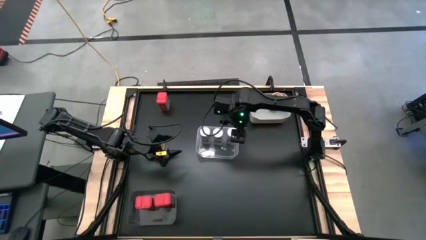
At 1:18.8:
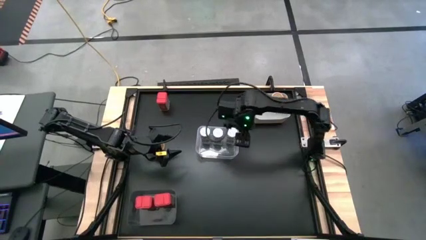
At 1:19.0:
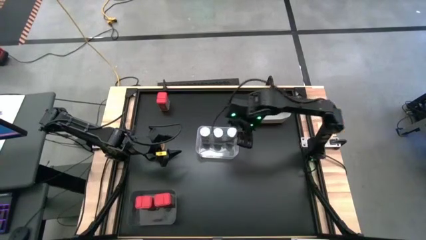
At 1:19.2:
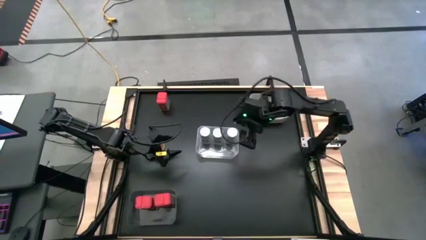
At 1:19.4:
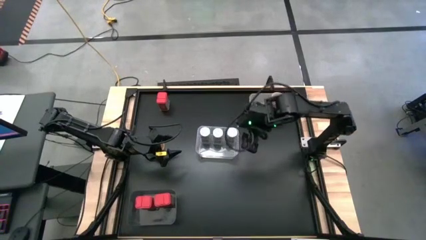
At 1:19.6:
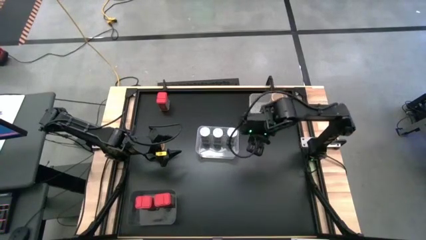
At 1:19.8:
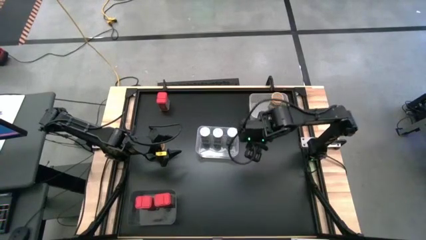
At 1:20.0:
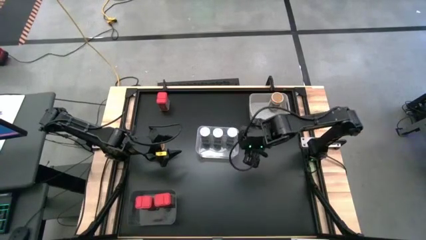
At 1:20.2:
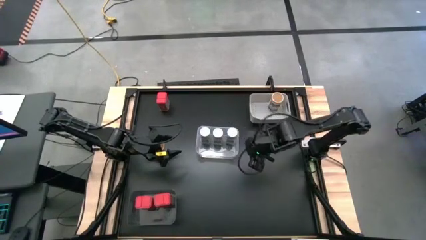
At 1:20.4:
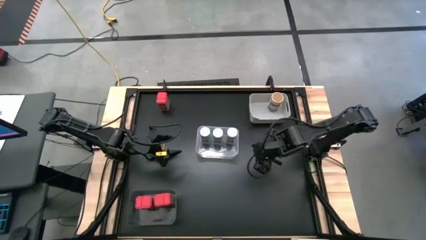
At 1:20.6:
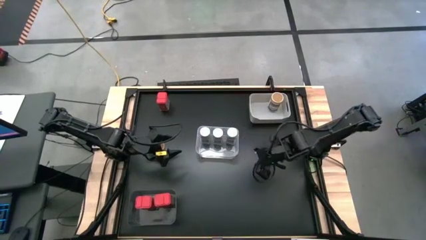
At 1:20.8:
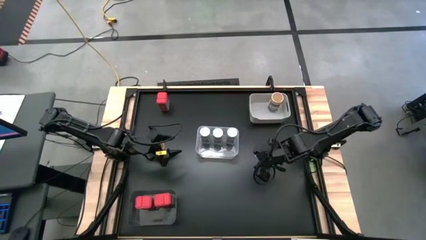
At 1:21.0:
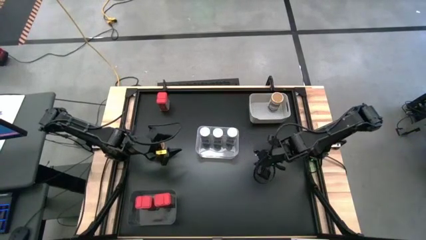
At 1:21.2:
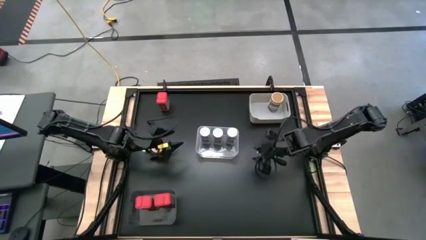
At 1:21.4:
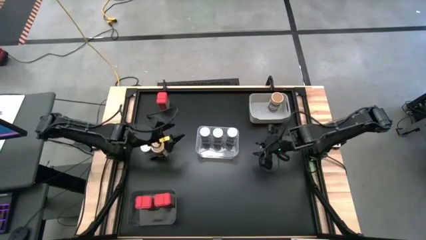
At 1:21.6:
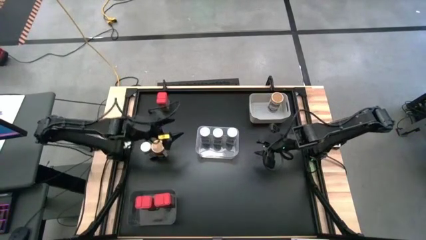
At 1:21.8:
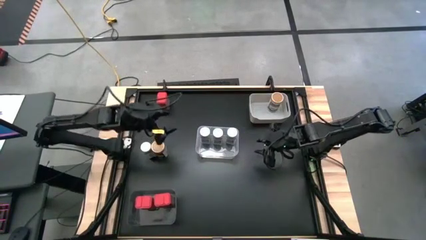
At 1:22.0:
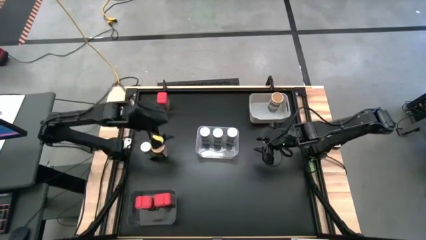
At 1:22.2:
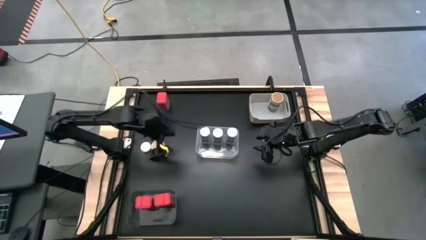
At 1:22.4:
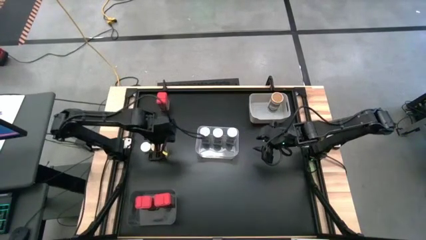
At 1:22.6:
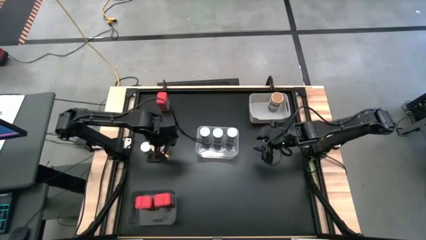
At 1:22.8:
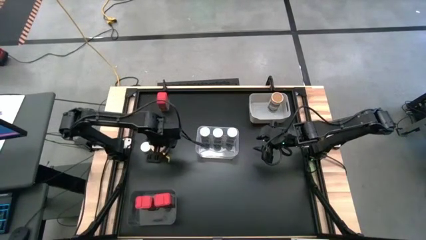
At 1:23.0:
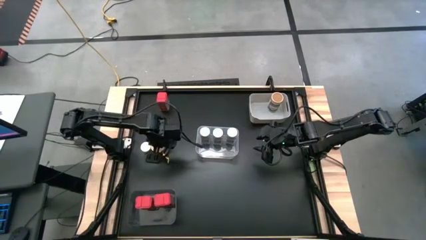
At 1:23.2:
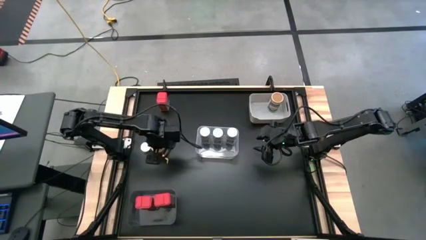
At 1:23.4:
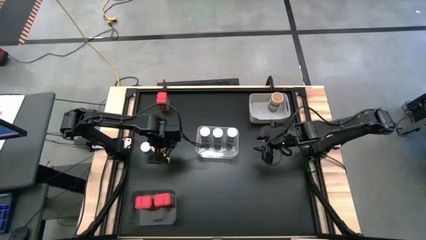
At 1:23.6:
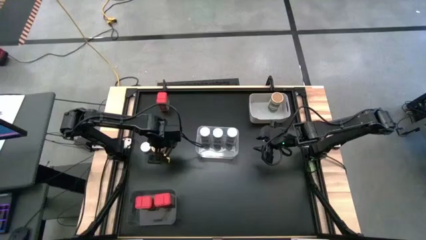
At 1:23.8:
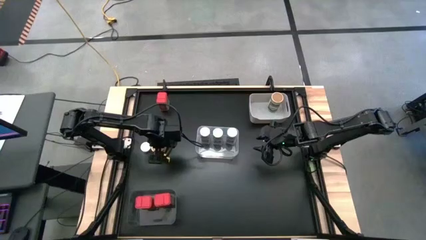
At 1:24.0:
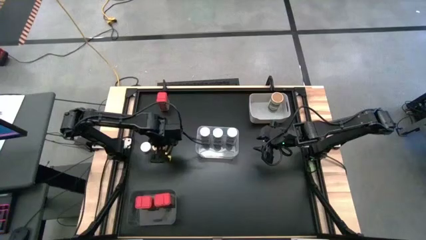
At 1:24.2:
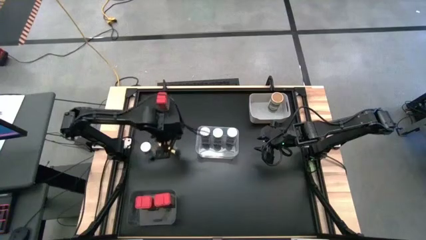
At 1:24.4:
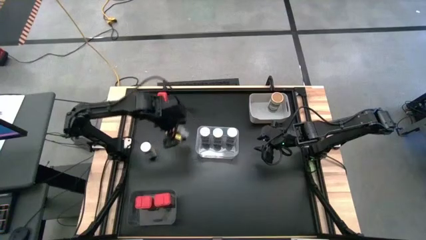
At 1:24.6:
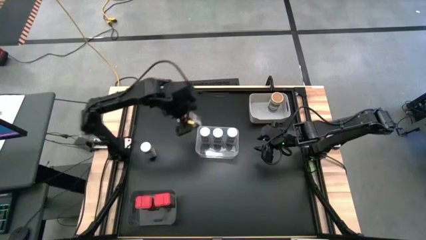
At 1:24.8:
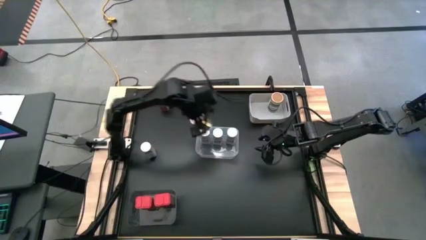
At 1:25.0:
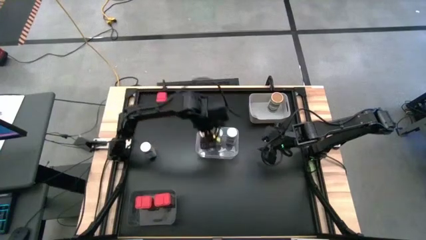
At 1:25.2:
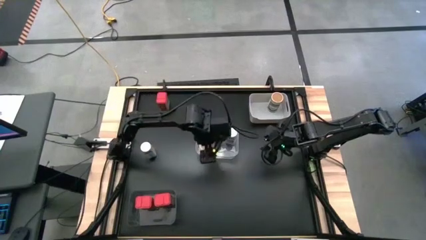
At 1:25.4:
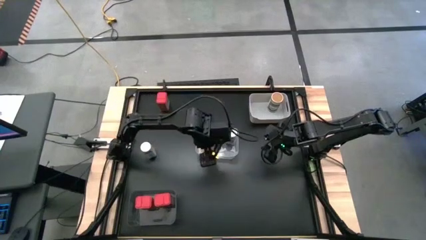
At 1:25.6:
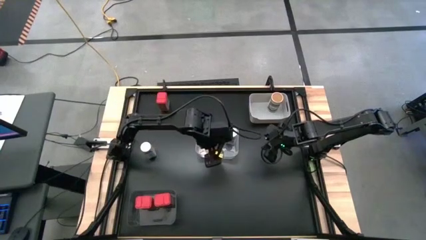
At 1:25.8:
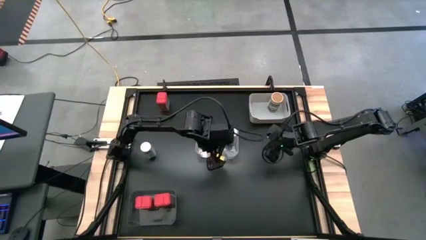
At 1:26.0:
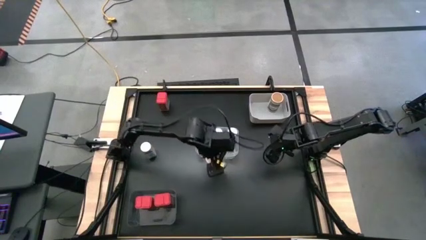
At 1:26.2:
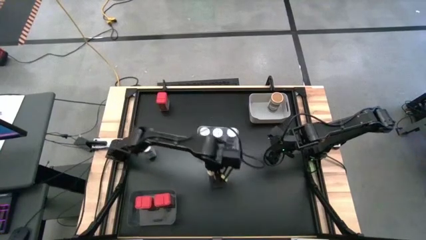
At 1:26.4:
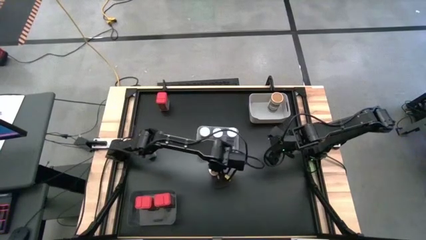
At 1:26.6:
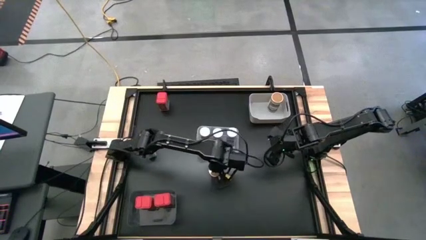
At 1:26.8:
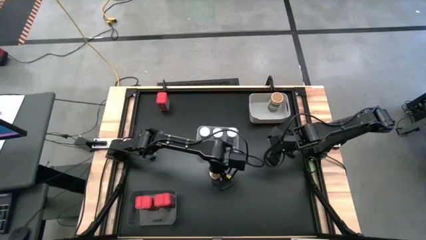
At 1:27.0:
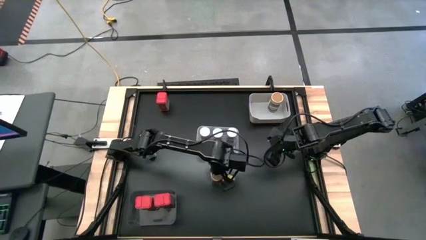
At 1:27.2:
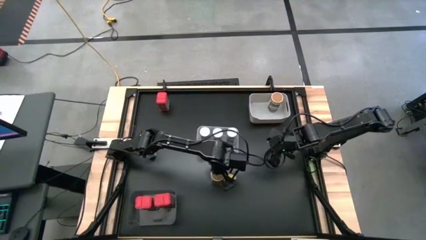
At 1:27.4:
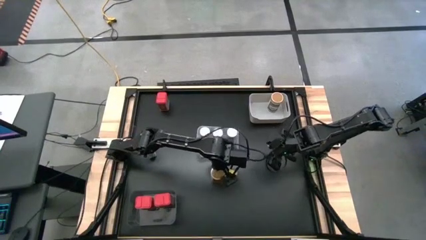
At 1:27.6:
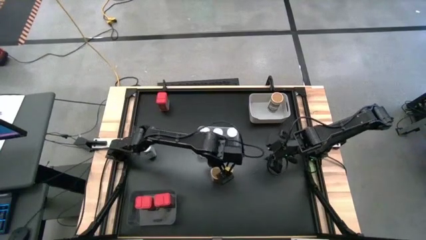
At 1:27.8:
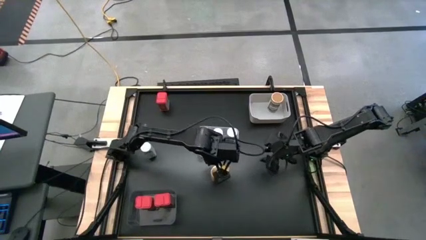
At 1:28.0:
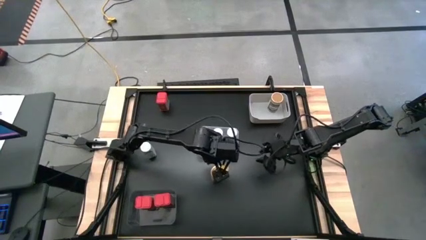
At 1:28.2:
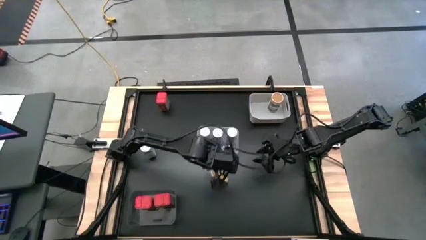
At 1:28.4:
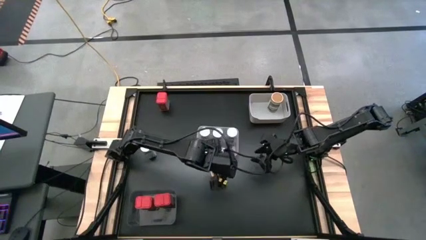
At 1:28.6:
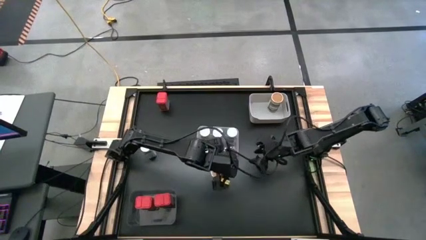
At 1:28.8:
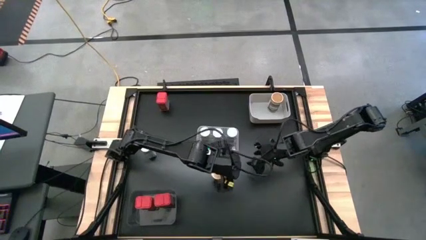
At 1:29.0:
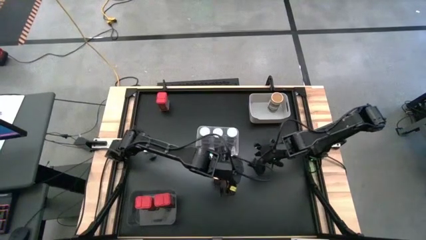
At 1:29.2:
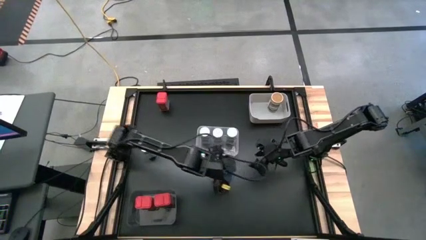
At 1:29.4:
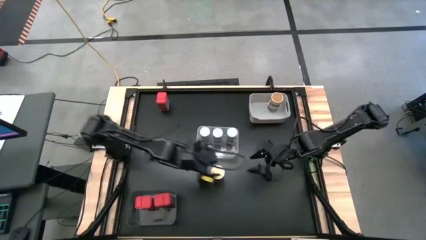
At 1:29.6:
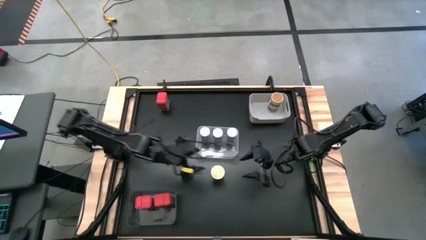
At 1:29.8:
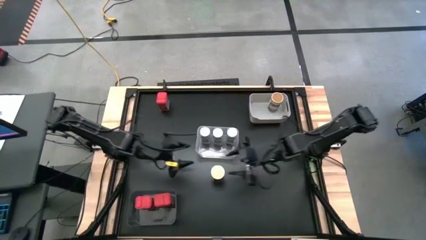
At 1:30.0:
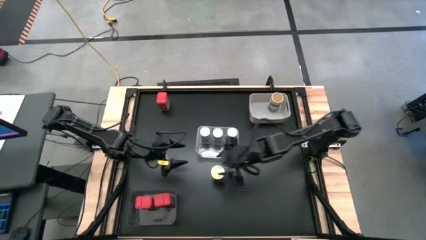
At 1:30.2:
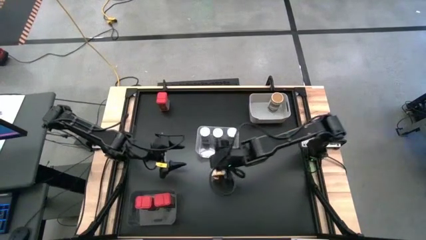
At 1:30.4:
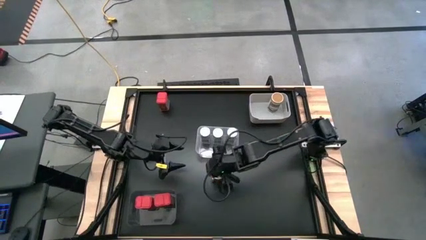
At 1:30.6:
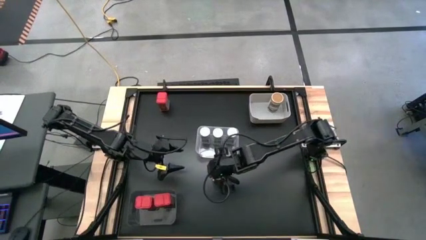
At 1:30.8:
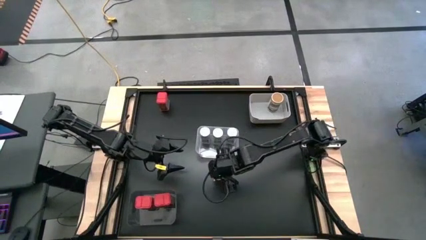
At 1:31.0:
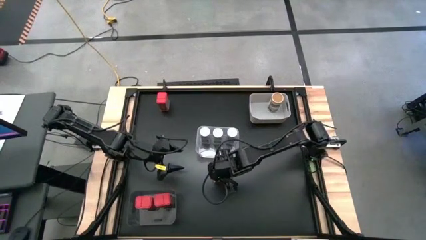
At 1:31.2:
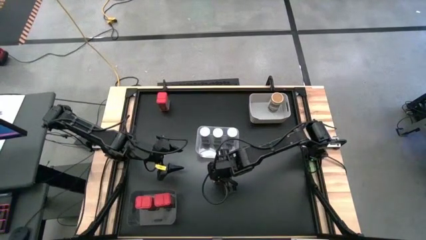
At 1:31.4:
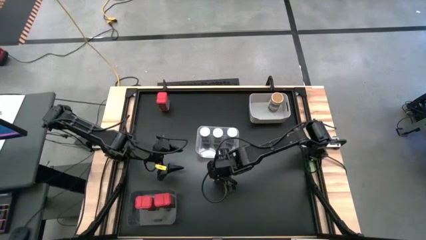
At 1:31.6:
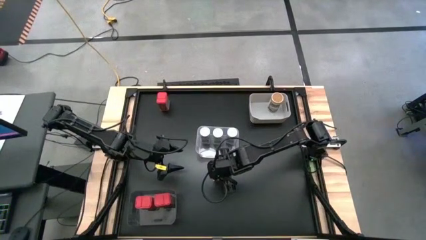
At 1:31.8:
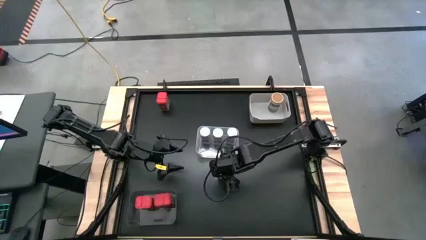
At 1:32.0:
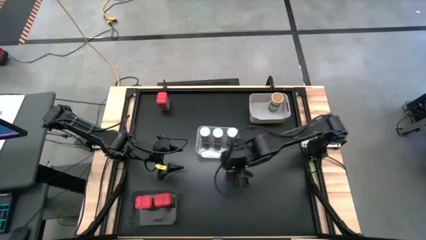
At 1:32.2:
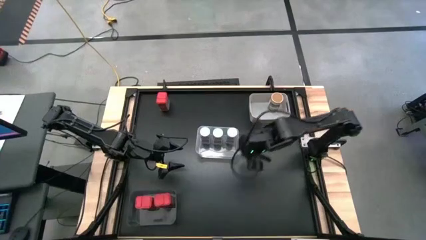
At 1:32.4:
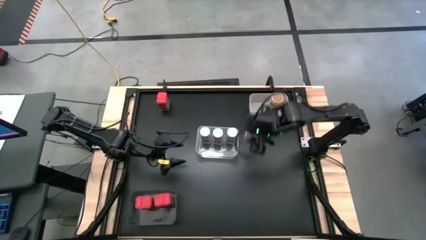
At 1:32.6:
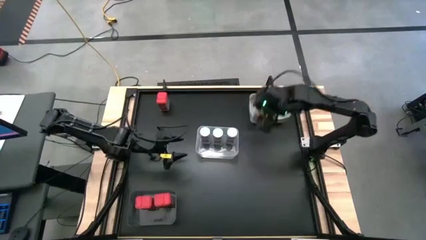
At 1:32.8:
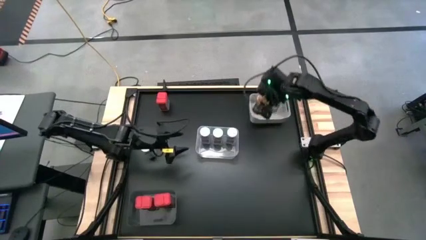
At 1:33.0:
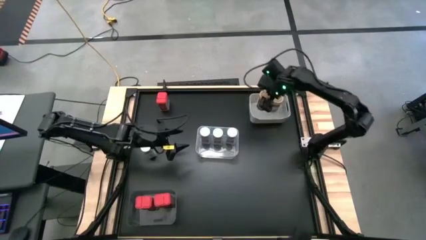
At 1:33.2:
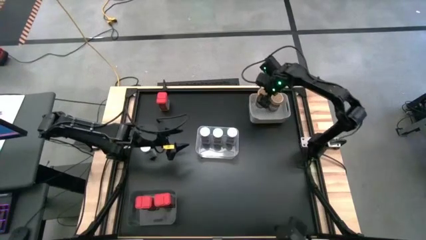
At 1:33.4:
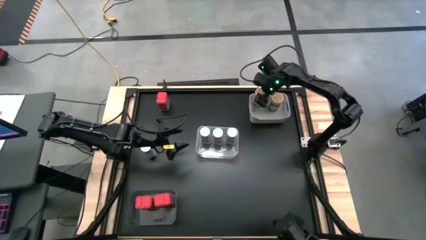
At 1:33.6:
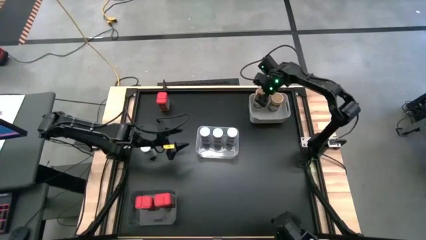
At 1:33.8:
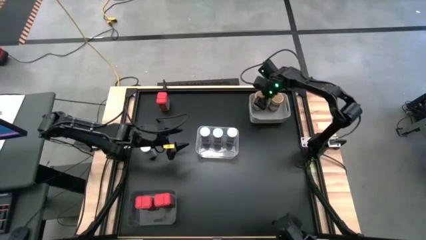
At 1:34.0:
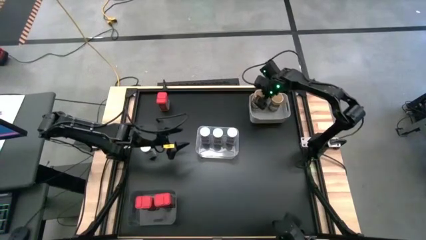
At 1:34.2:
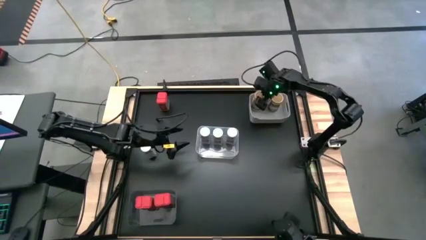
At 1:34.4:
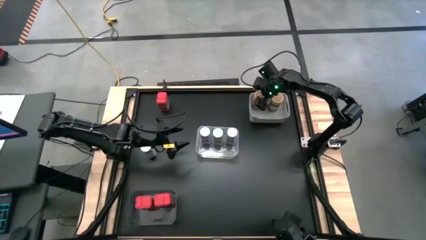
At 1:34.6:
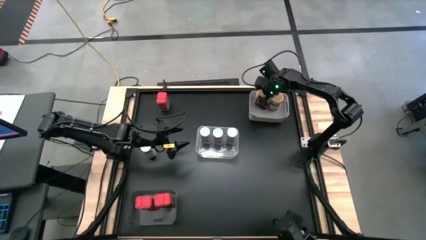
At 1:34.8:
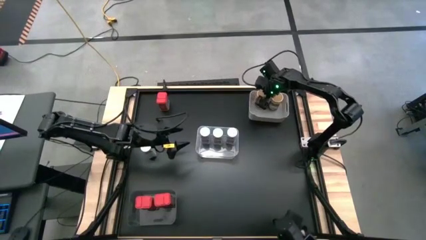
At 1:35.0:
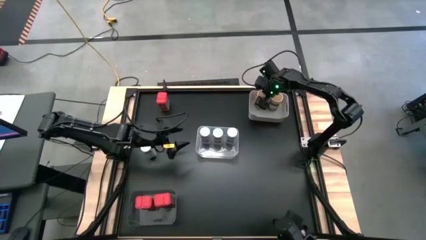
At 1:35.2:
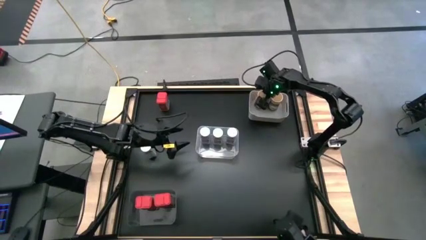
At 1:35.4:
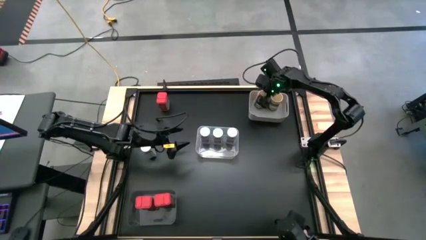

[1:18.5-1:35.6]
Task: Sort spices by type
Put the gold seasoning bottle into the white bin
